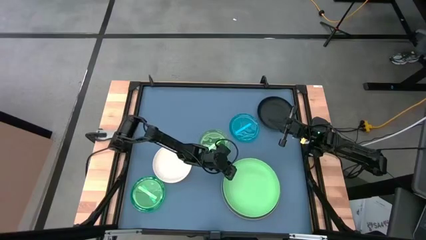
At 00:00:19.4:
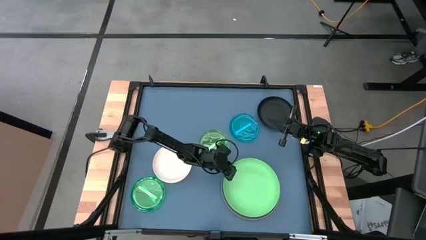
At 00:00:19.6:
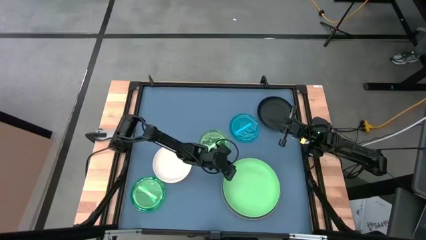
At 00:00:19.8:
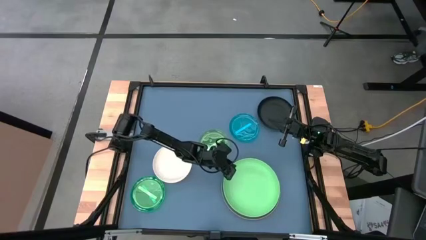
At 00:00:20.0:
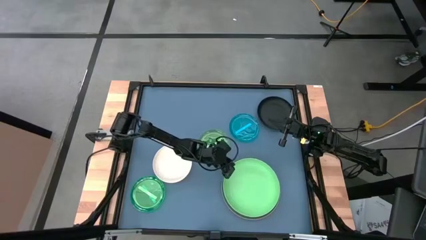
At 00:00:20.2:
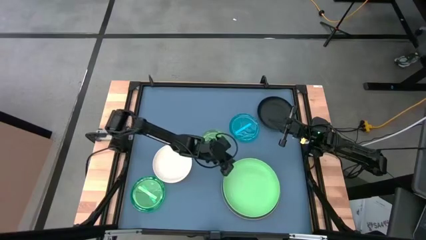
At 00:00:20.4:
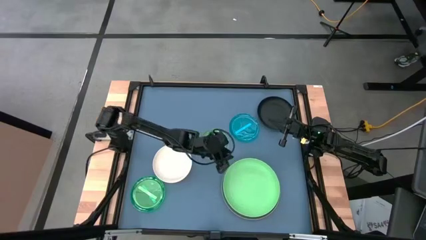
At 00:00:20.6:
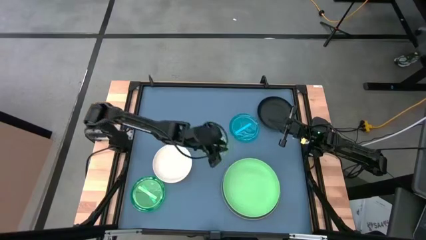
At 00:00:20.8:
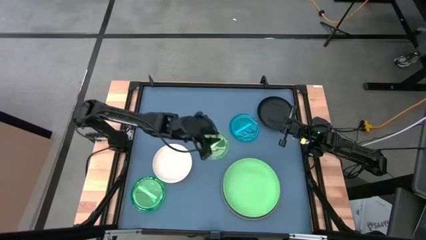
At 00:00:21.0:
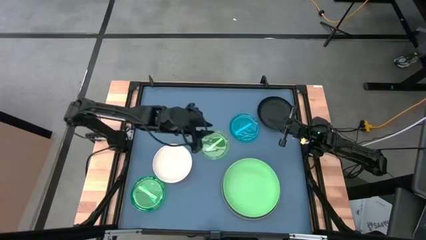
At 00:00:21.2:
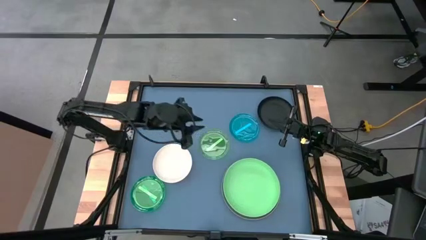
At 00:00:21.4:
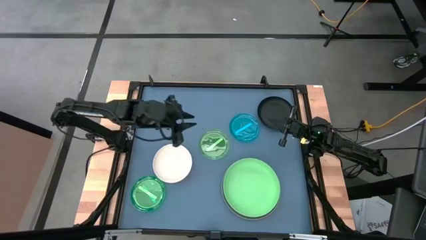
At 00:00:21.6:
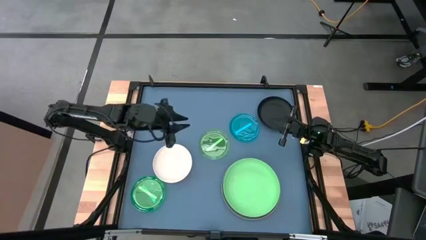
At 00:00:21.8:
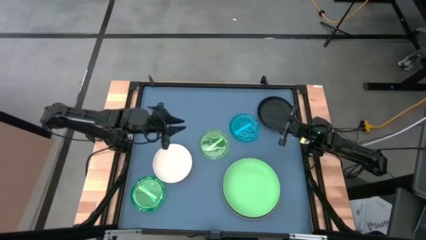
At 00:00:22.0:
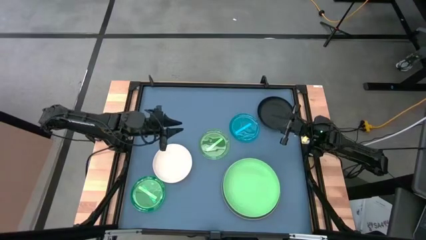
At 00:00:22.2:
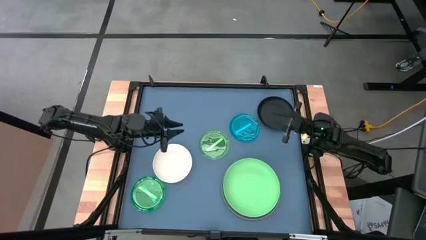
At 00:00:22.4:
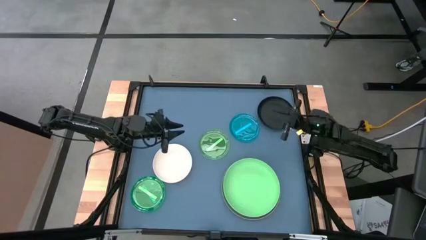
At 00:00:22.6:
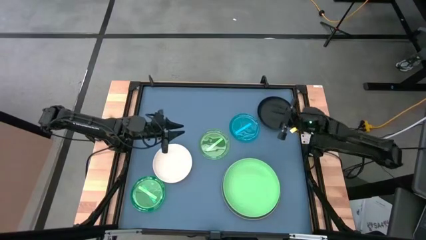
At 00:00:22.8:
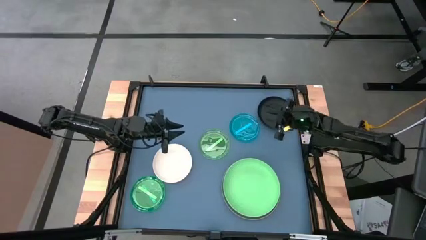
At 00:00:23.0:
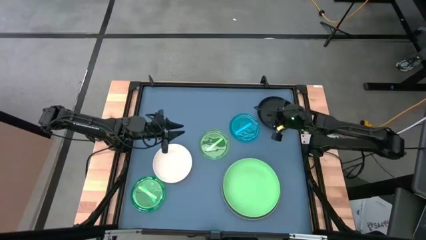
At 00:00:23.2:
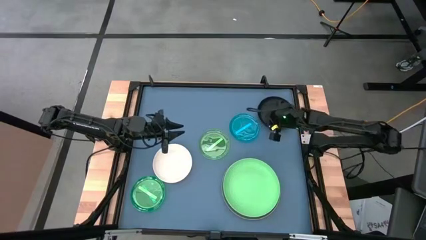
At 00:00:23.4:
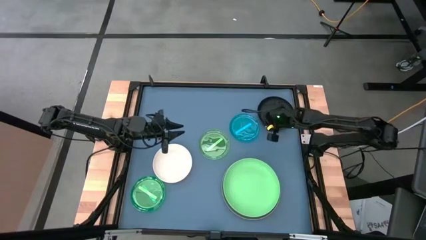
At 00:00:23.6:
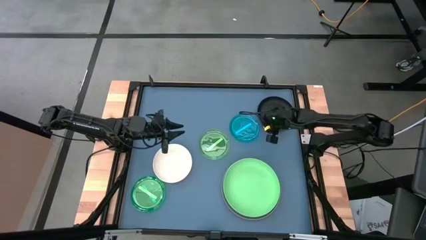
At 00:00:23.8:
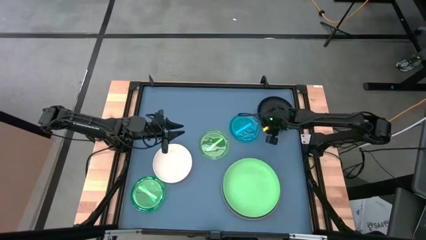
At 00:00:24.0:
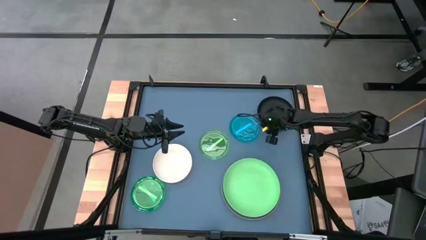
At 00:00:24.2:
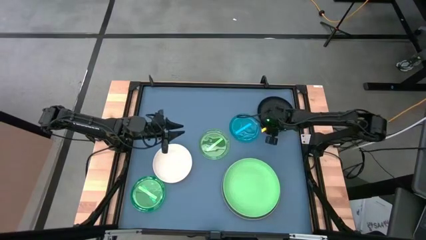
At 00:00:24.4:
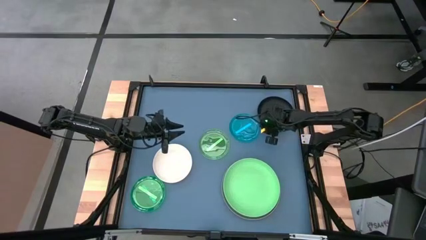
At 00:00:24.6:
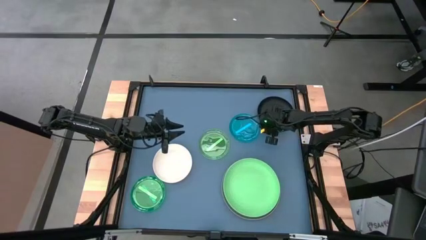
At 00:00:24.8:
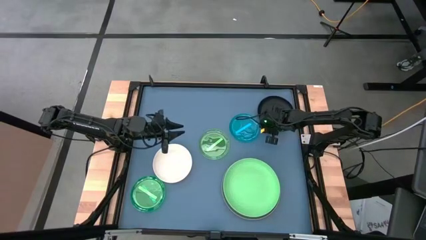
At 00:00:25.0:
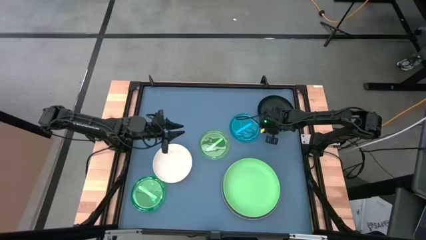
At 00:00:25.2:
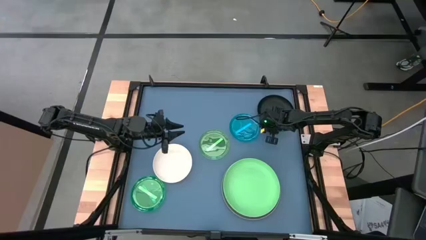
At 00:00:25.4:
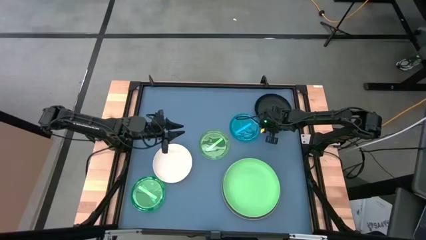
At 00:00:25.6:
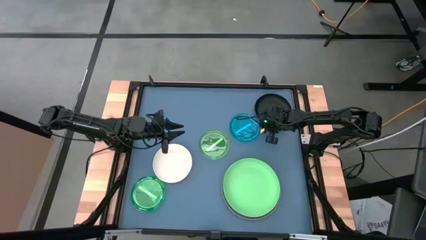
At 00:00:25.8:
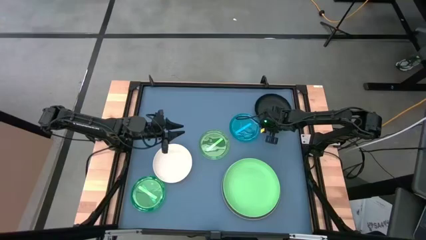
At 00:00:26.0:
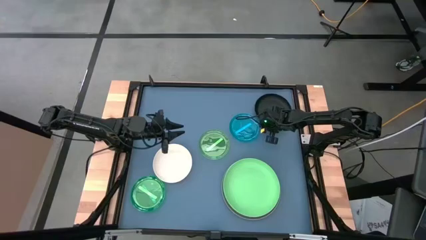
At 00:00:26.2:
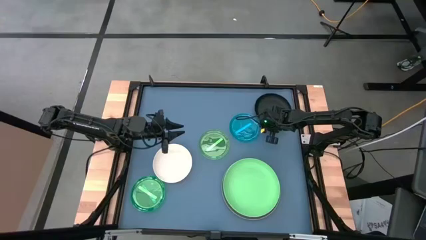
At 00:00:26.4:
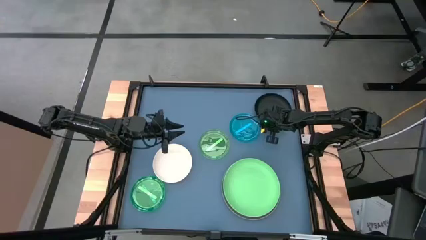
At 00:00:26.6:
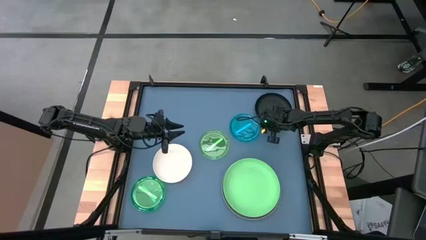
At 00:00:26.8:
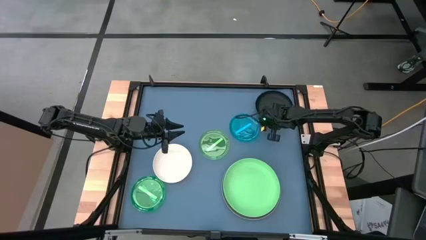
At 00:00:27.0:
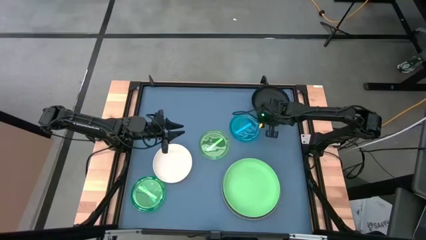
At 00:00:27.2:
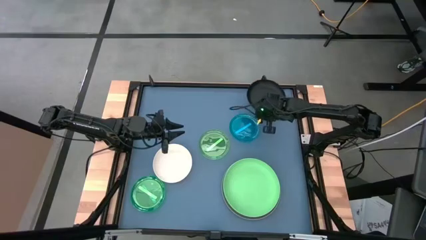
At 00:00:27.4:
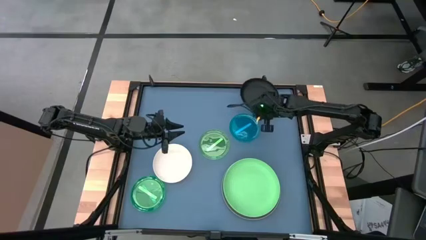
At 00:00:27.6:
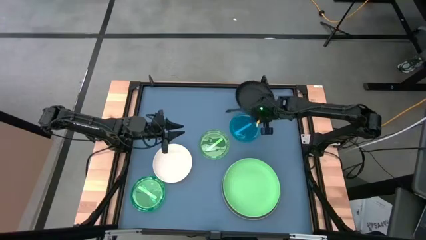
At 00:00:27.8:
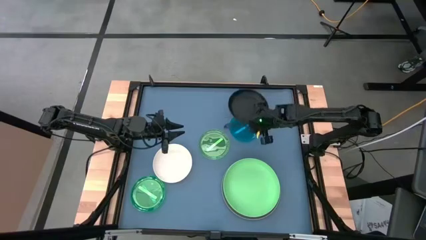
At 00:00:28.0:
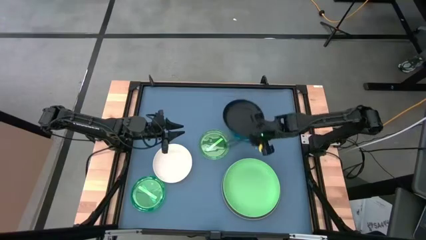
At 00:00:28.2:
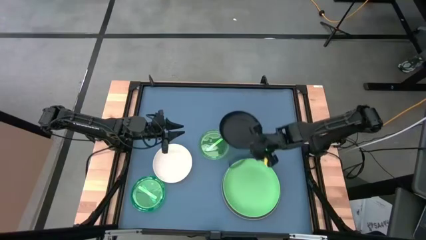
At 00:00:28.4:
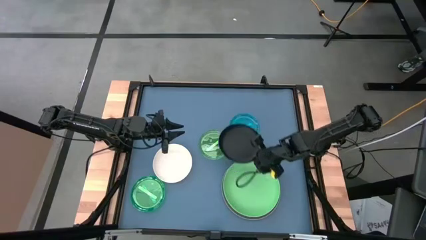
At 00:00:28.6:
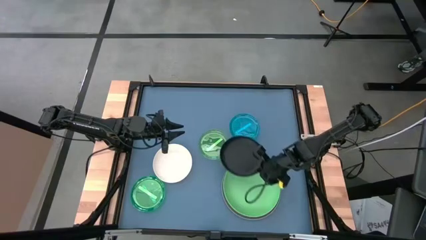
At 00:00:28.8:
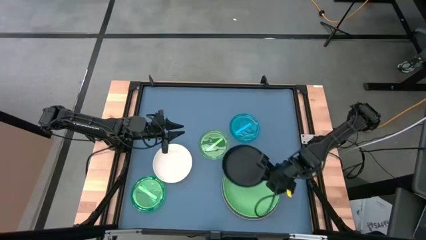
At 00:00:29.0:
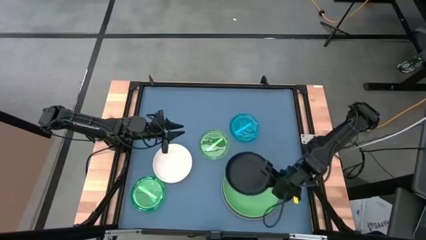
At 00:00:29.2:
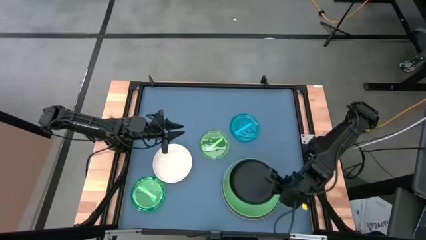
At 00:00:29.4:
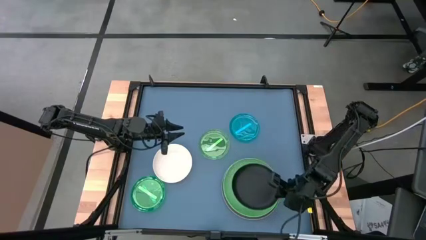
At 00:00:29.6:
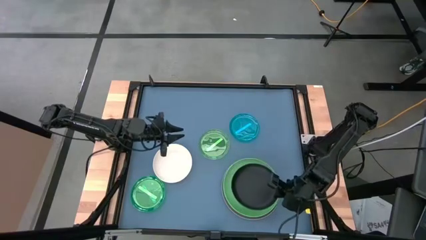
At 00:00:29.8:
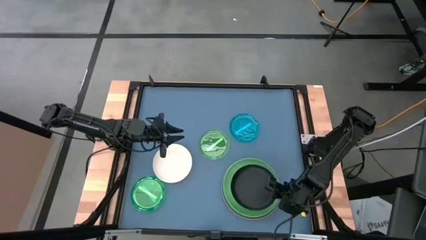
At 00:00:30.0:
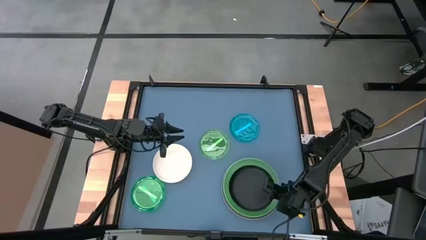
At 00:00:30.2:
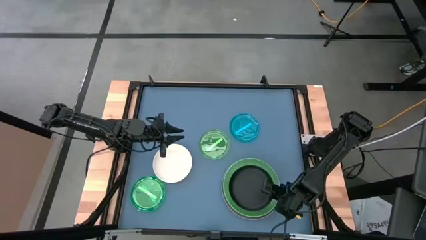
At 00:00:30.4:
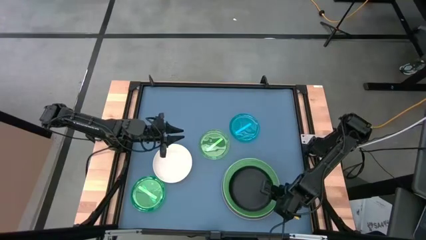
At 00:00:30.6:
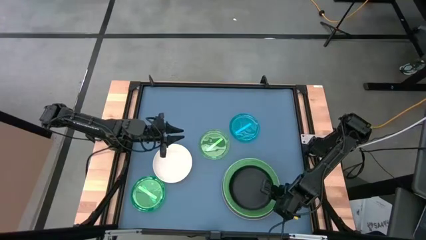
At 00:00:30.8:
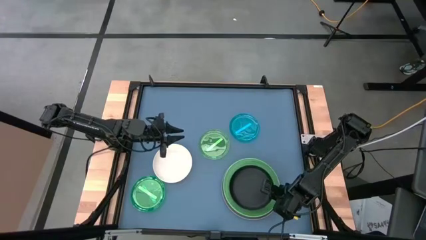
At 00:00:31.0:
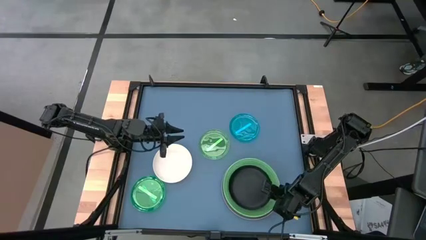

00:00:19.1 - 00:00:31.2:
Task: Stack plastic plates
Stack the black plate on top of the green plate
